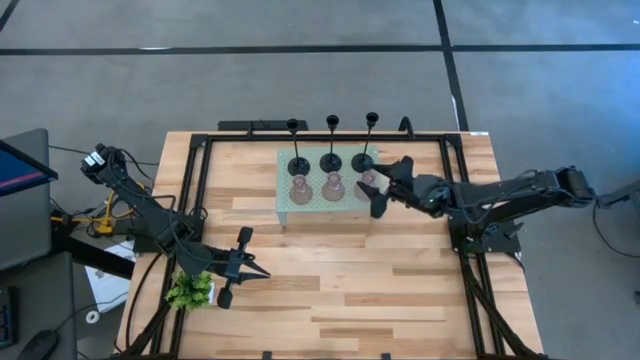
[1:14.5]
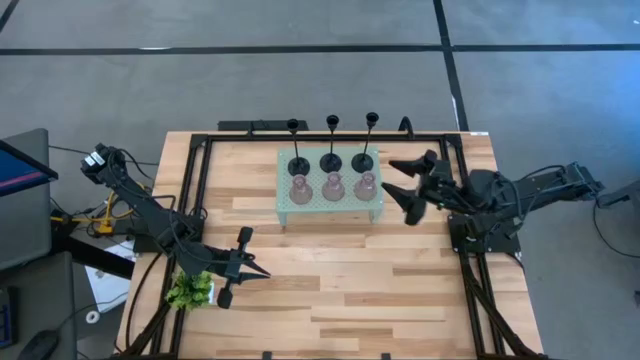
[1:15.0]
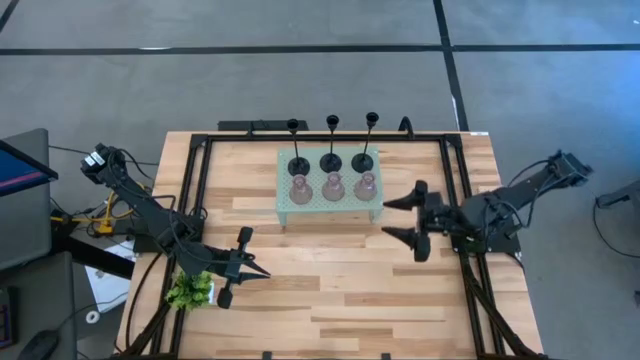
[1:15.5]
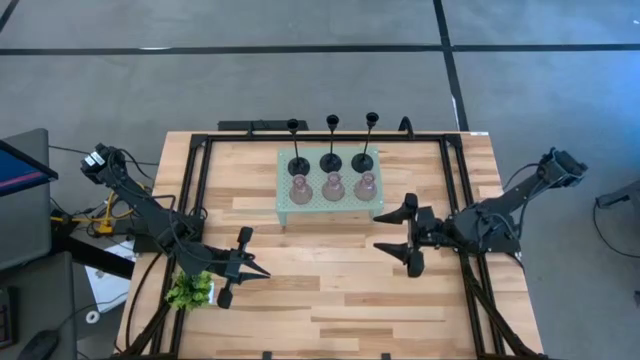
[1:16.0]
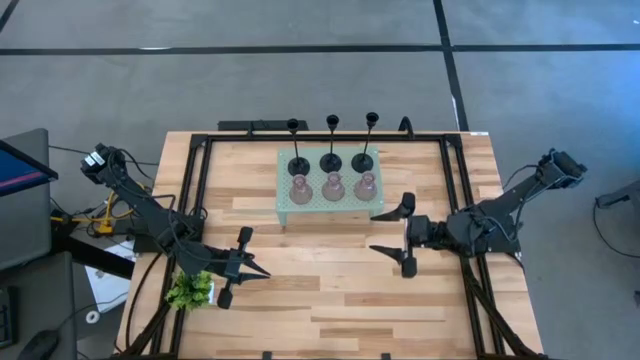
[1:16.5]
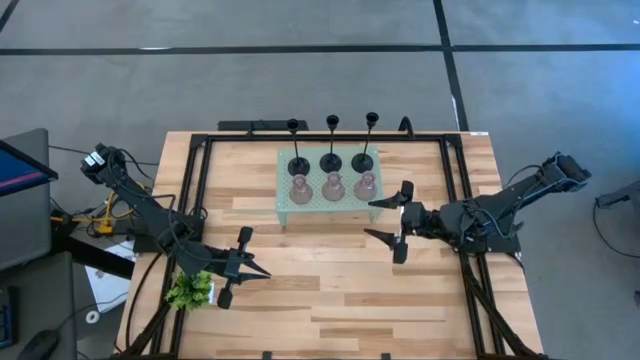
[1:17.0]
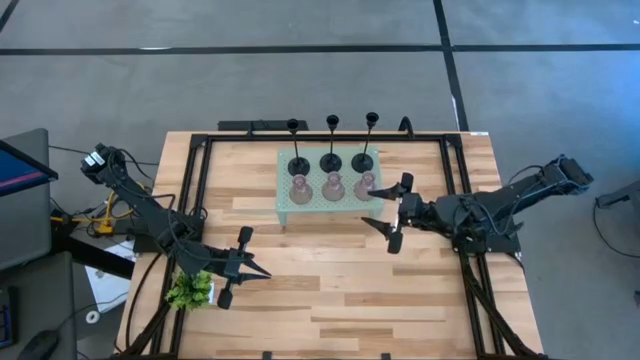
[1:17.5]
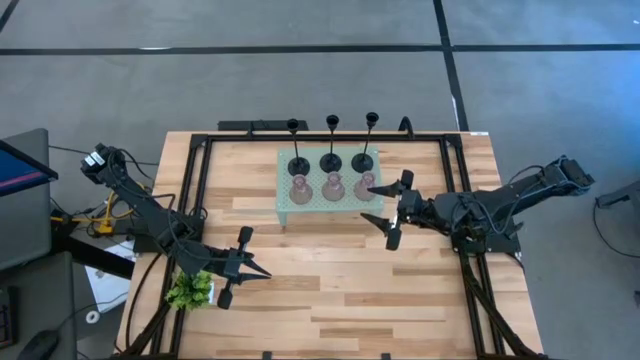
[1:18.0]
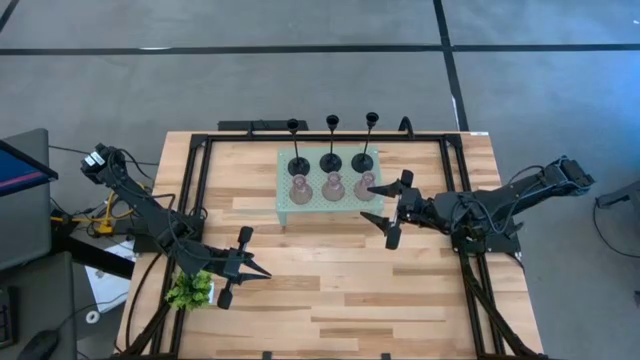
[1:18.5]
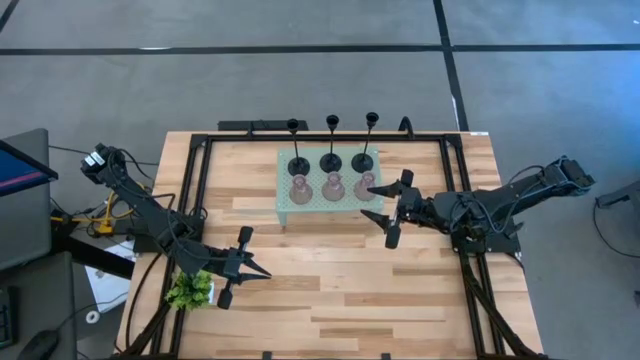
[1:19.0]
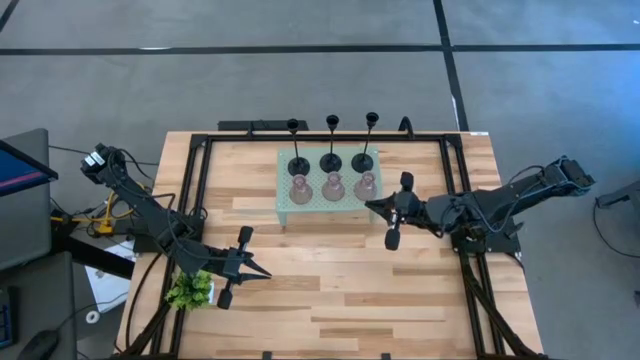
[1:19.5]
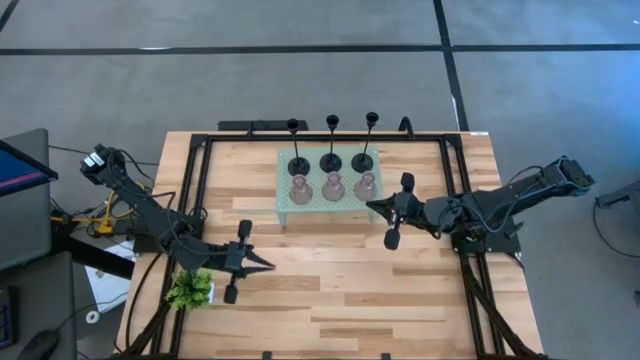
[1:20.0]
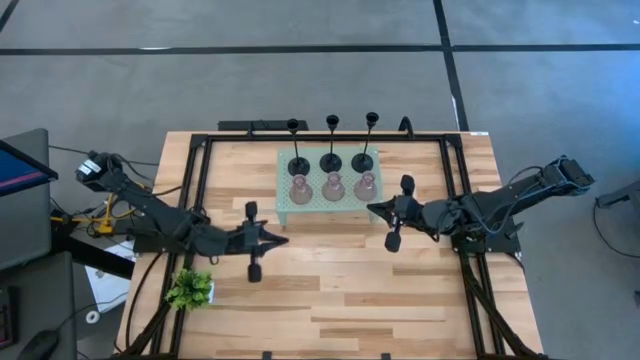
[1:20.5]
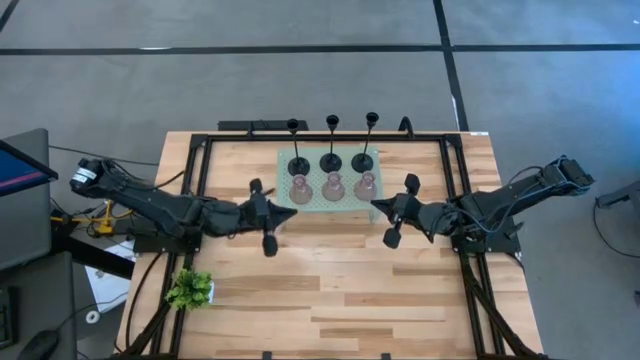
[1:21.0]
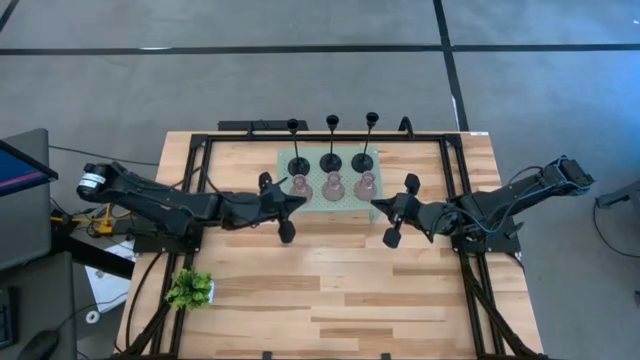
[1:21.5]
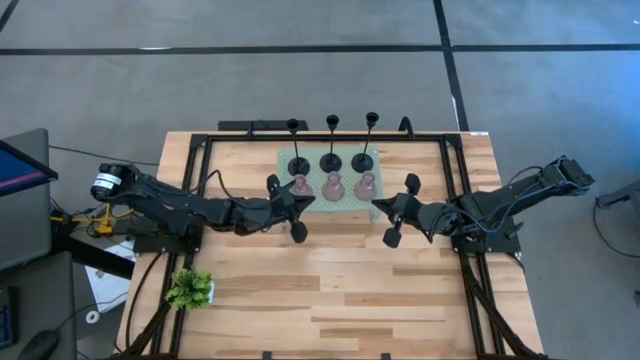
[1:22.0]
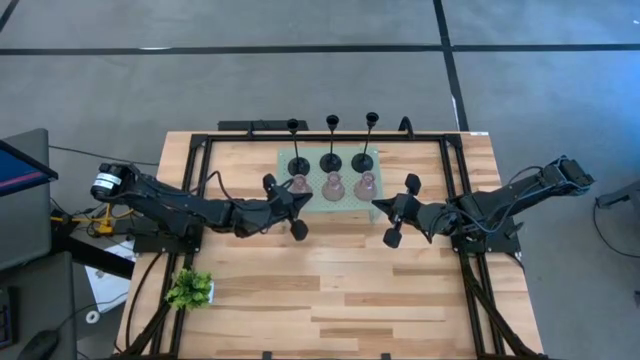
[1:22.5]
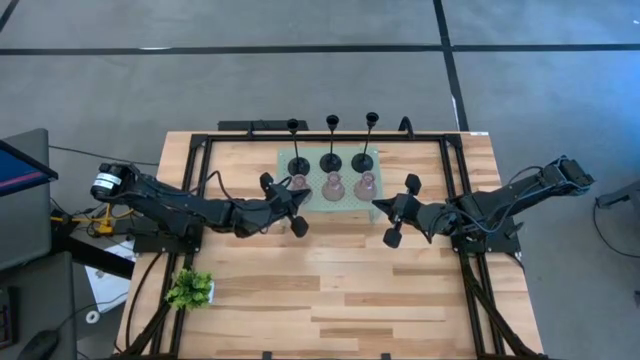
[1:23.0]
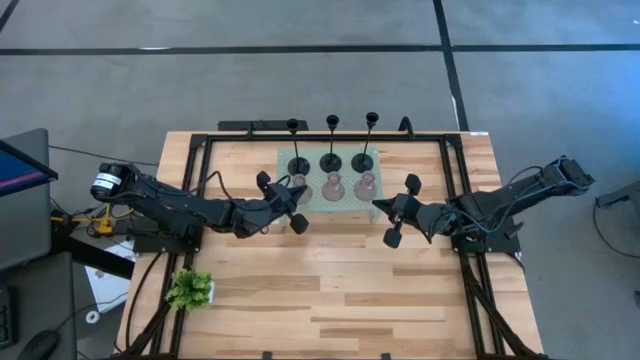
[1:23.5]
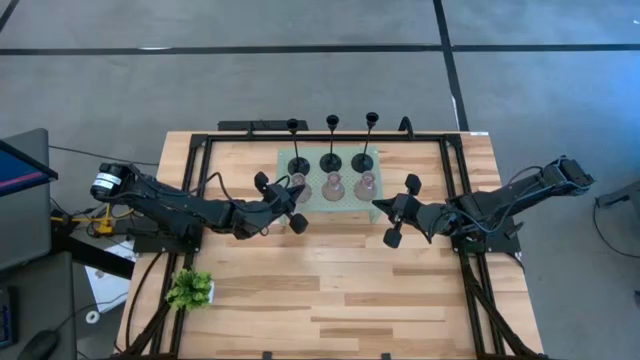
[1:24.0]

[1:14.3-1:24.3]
Task: Pick & Place candle stick holders
Adjust the left pink glass candle holder on the shelf

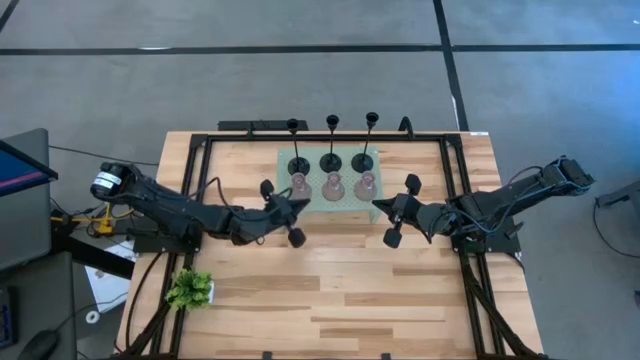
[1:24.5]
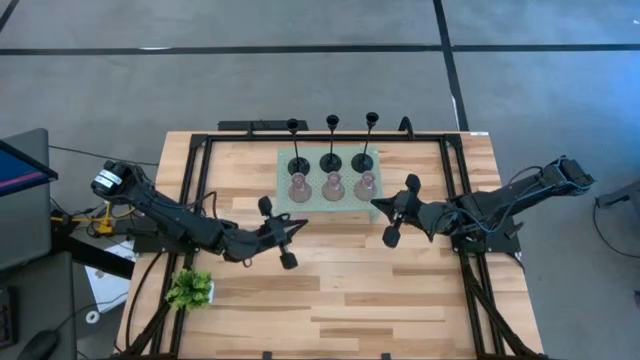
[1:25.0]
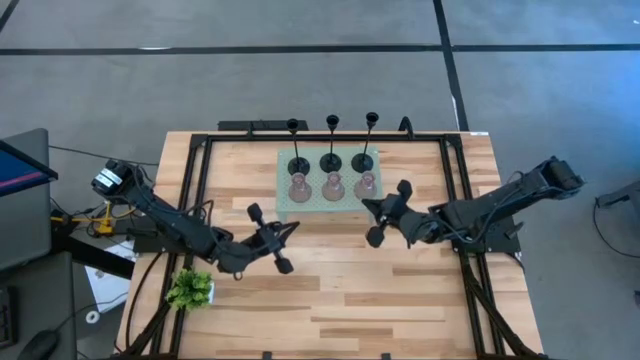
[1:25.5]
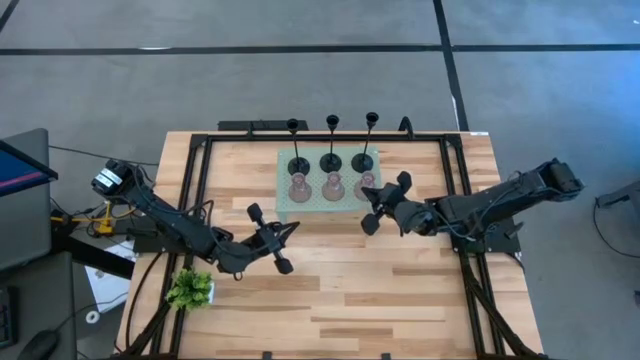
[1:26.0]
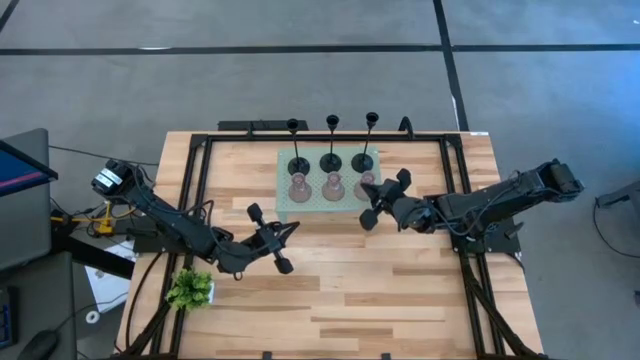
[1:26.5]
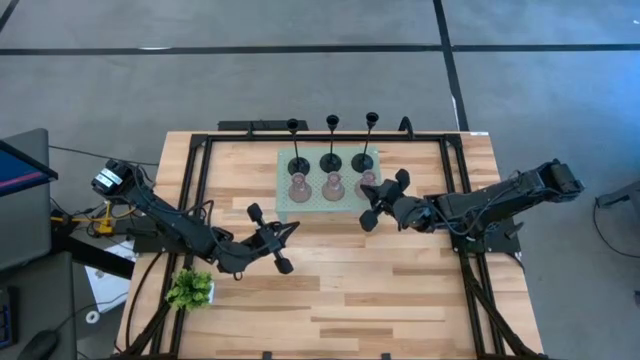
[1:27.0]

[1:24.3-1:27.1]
Adjust the right pink glass candle holder on the shelf

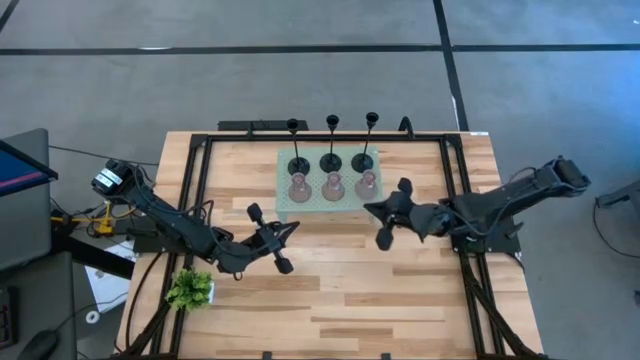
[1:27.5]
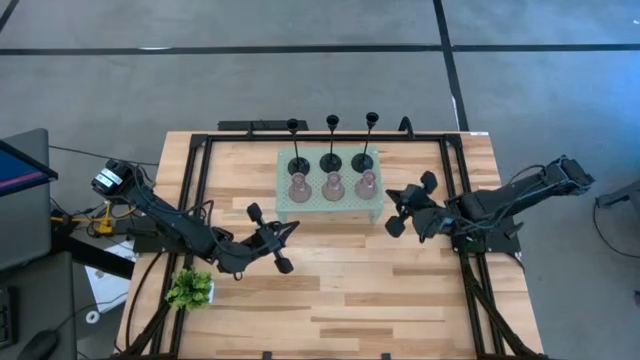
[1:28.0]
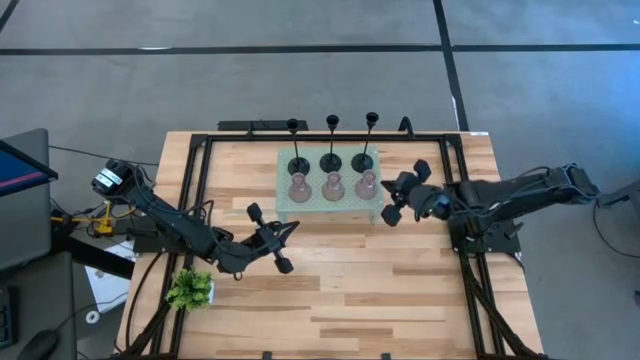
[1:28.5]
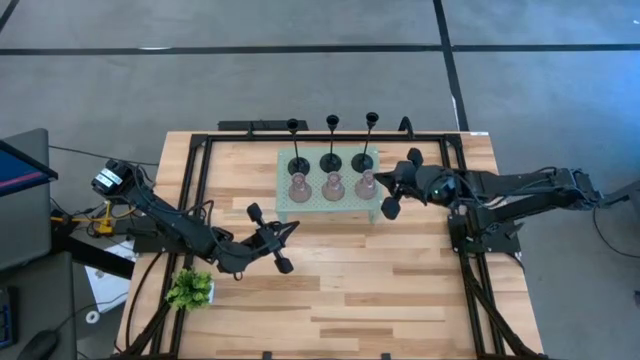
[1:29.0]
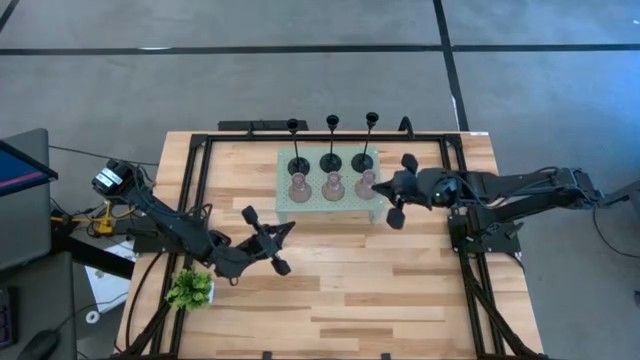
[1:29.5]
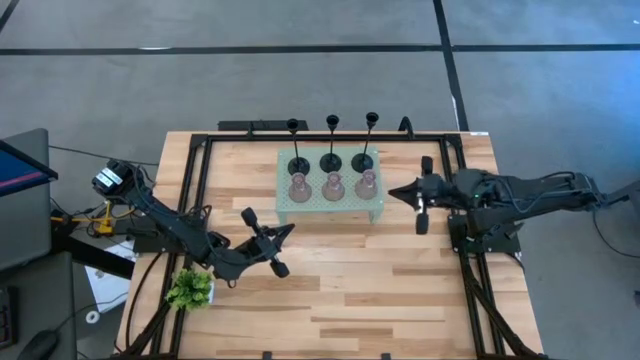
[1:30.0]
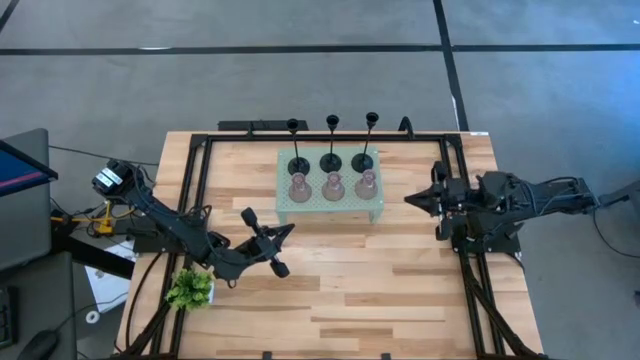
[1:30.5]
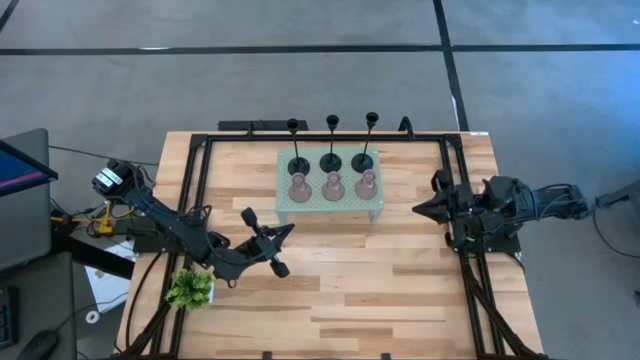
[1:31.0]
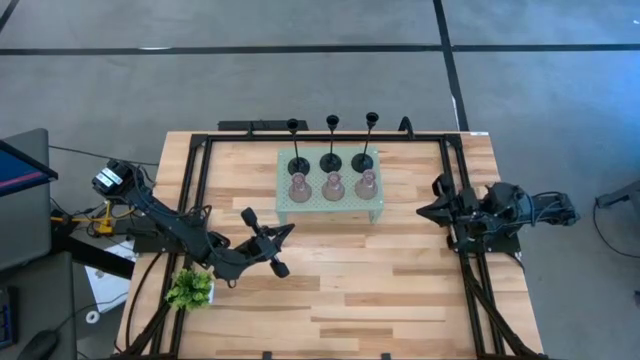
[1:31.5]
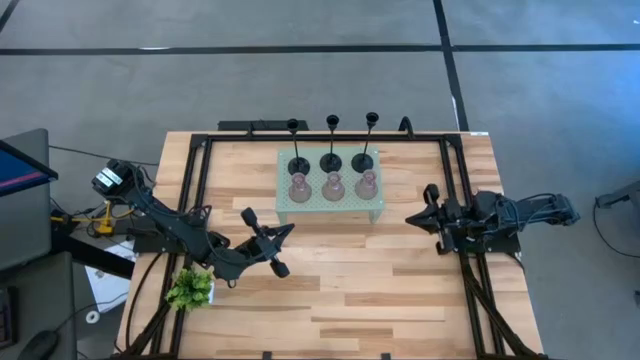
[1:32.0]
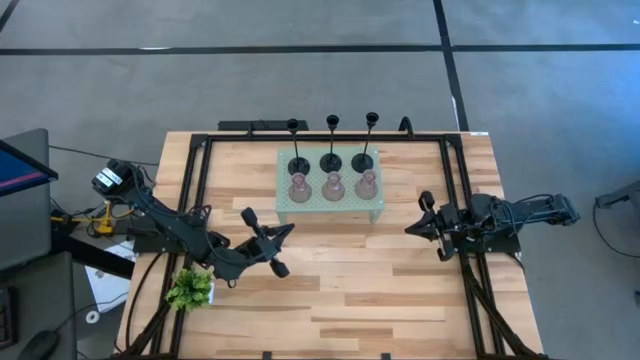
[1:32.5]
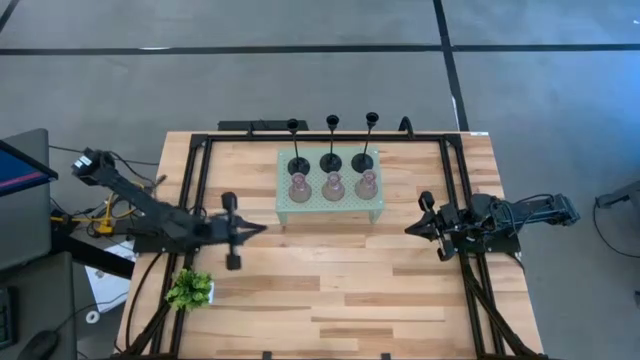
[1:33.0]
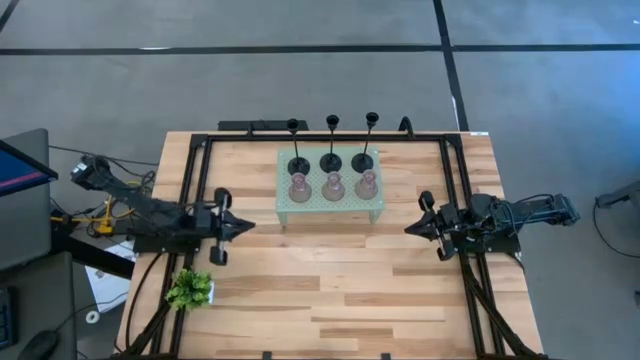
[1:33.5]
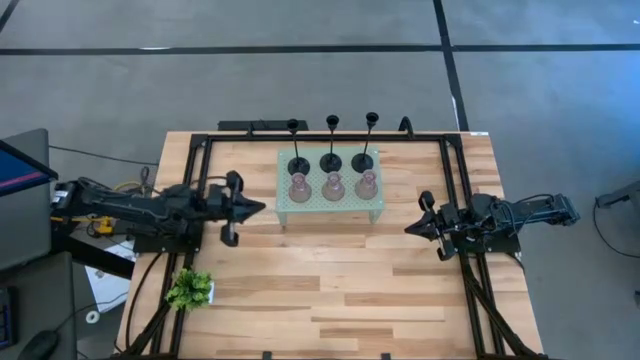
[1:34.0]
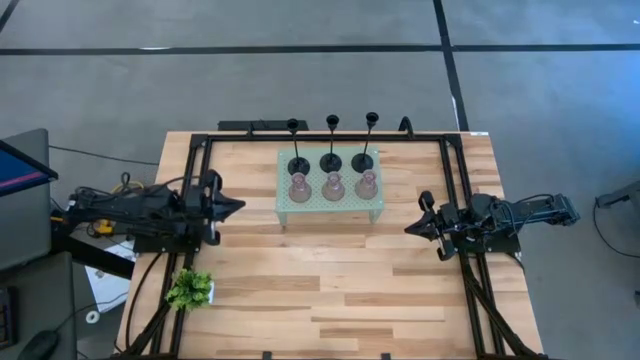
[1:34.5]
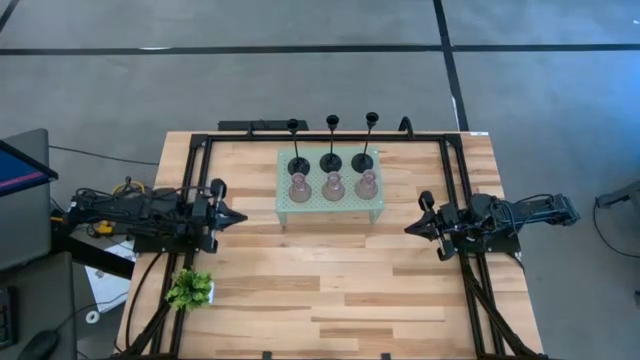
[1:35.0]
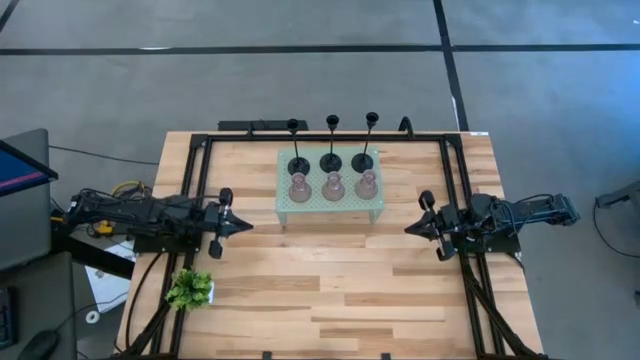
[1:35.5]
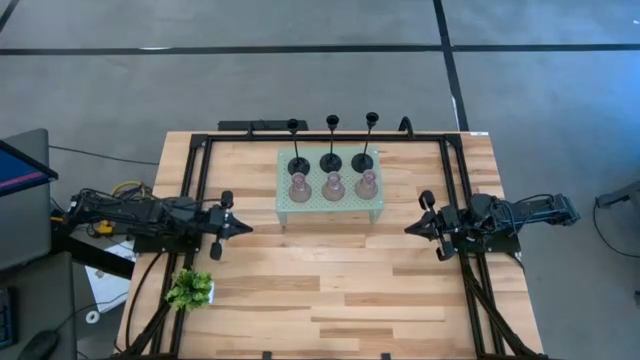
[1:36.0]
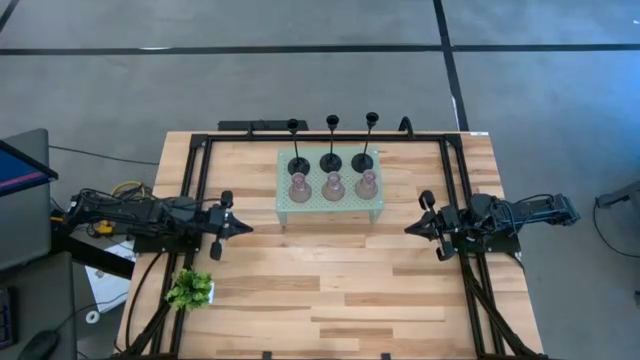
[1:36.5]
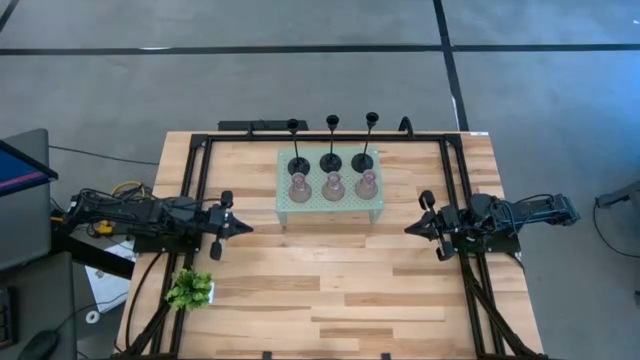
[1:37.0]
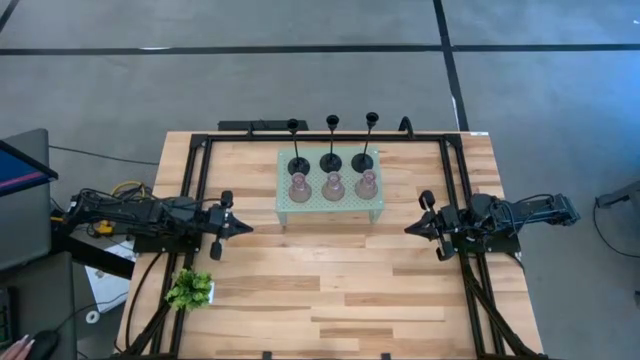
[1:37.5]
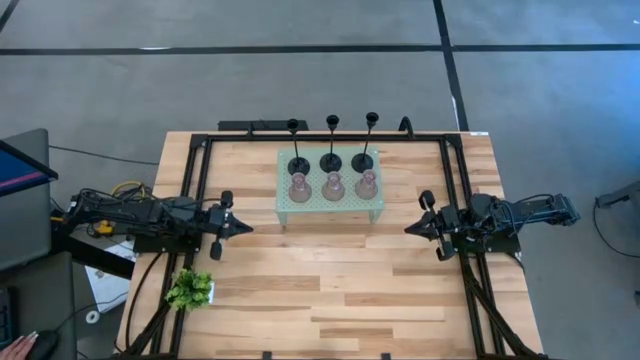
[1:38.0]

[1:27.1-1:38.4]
Return to Home Position
